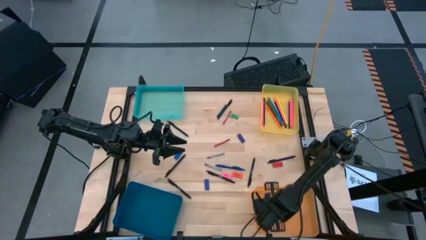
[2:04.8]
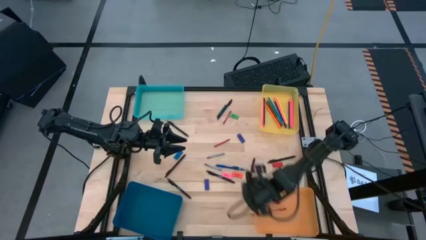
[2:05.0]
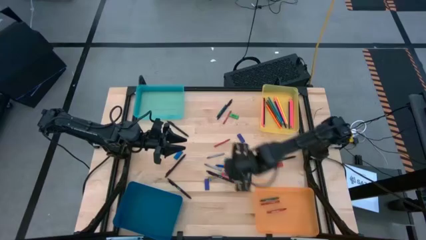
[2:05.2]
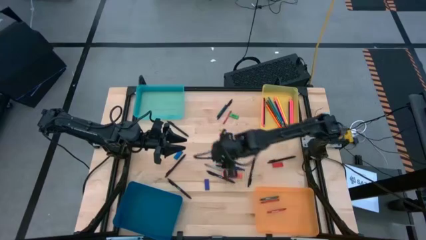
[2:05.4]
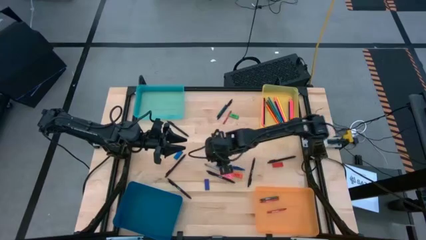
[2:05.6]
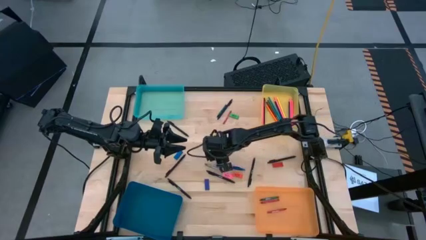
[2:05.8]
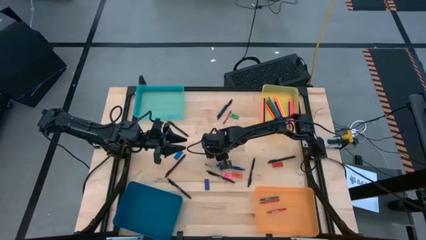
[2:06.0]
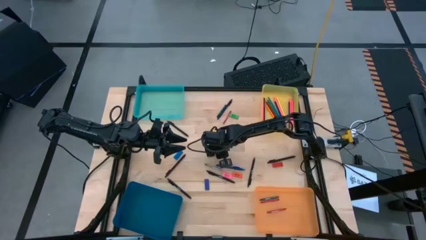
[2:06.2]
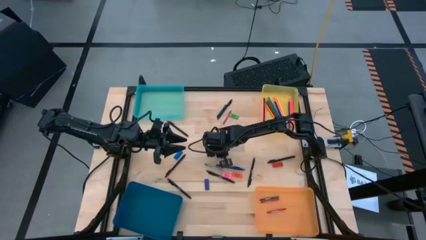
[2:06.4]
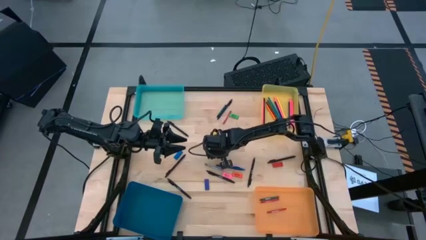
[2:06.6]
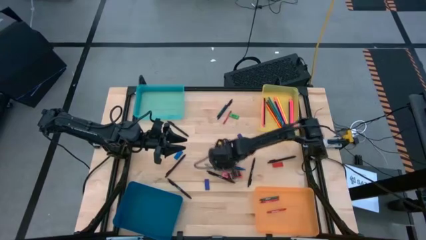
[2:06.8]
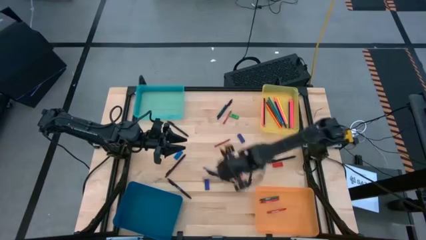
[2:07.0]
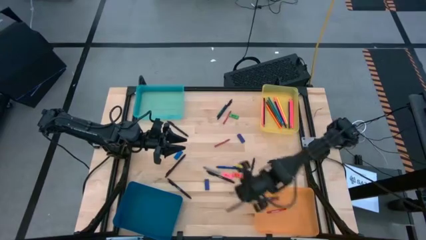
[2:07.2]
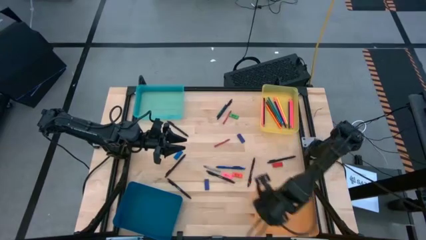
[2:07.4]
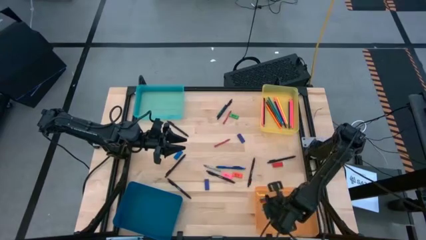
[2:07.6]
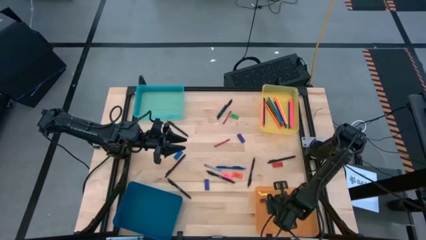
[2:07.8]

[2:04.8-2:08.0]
Task: Sort crayons/erasers/pens/pencils in bins
Put the gray crayon into the orange bin

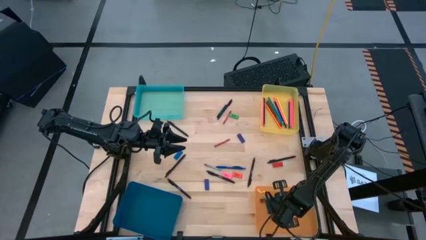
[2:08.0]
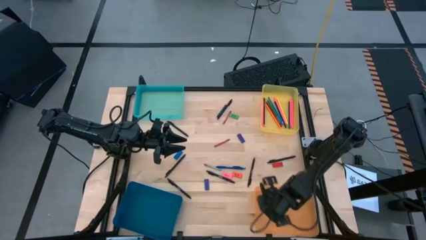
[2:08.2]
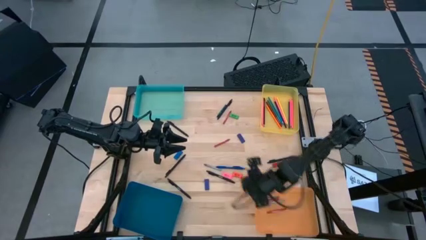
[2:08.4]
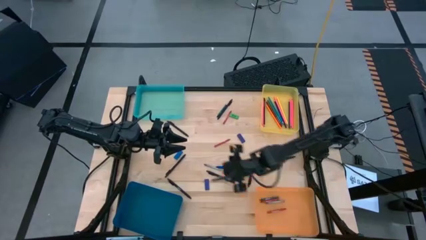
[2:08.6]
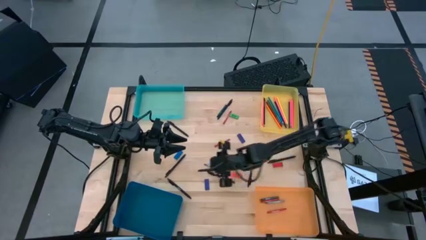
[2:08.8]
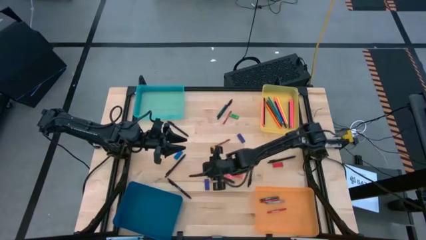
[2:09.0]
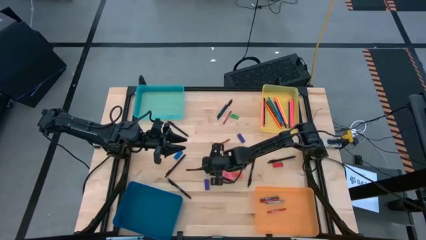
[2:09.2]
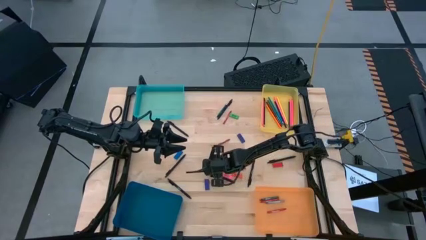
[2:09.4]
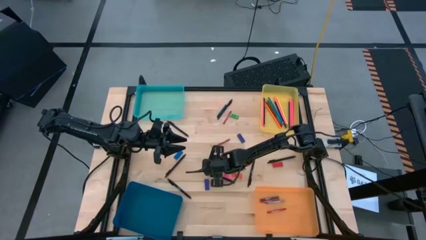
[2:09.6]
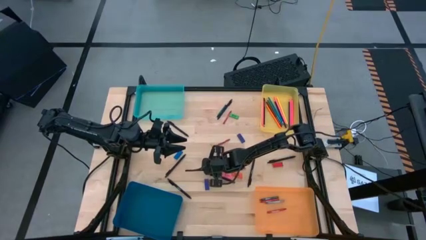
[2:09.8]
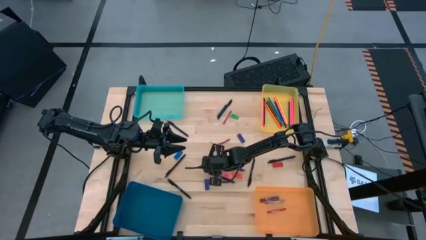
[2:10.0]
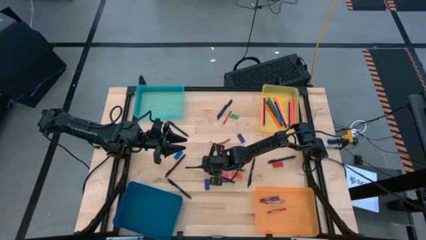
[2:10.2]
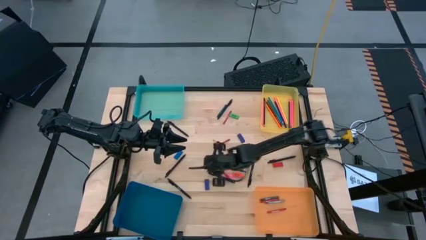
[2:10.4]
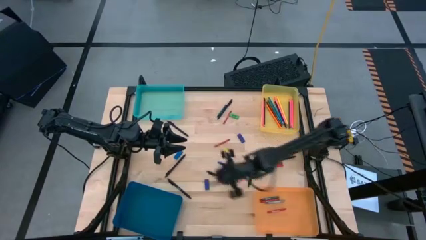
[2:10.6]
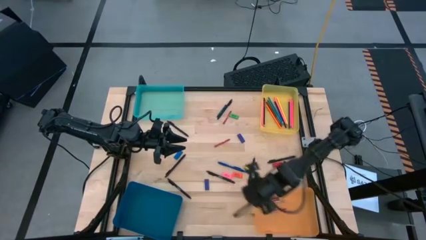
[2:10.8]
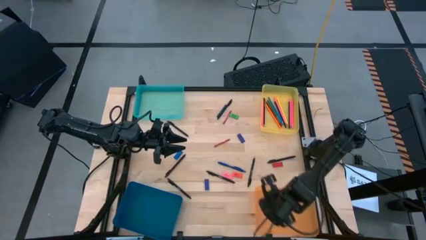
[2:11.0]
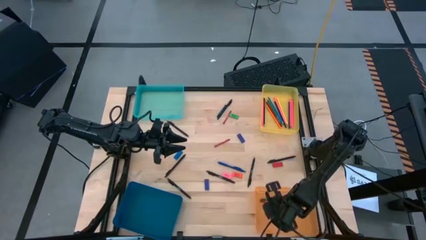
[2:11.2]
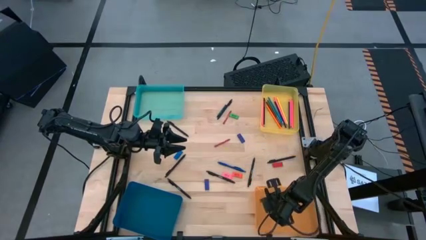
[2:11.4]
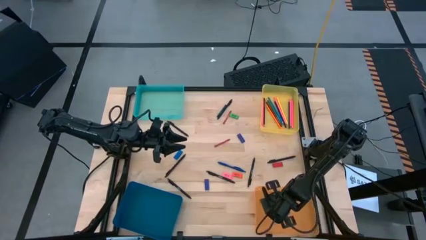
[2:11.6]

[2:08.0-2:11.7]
Put the gray crayon into the orange bin

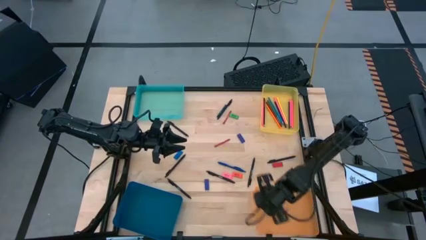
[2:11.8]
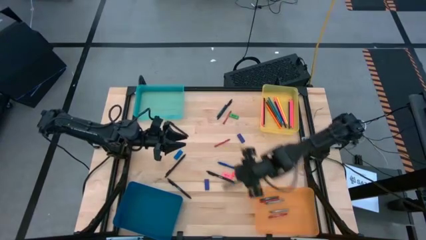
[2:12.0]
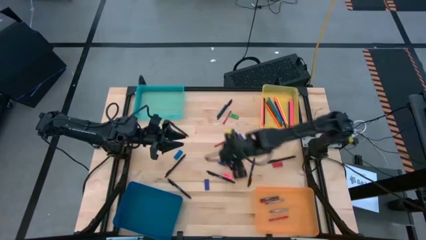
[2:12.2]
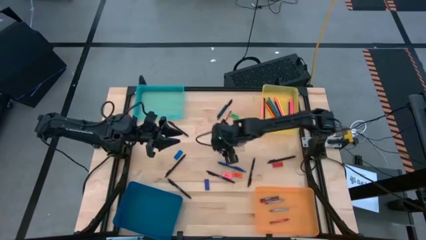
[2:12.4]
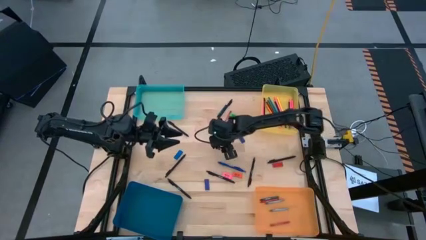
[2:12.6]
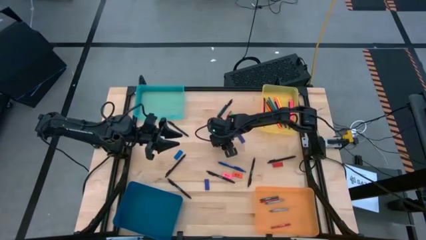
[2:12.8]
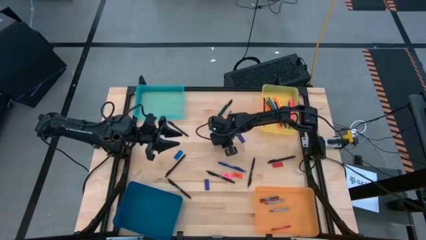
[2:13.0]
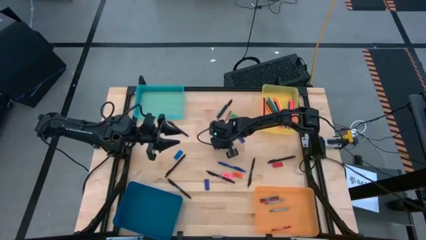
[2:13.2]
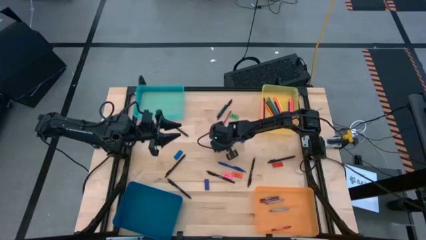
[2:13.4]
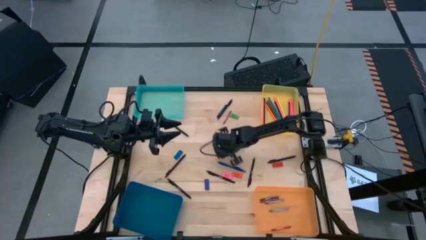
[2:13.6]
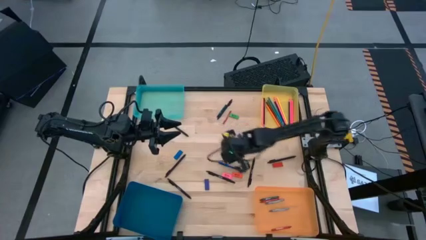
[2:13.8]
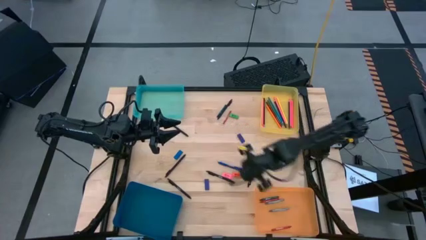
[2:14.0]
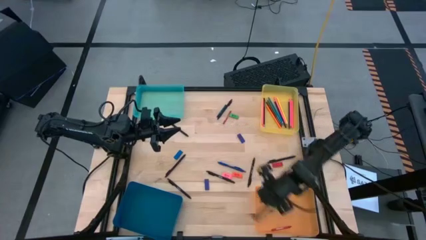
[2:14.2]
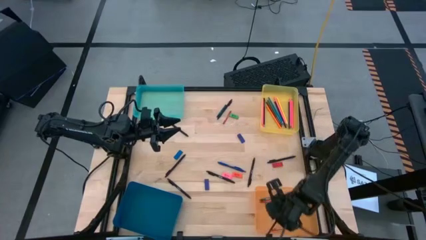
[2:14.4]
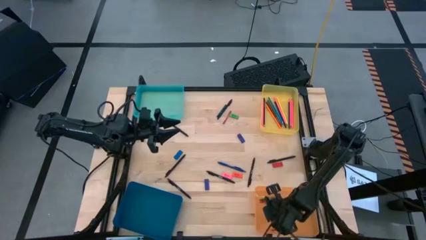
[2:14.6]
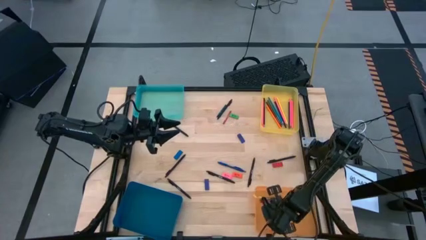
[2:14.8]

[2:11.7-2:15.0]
Put the red crayon into the orange bin

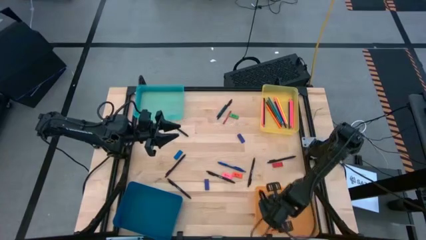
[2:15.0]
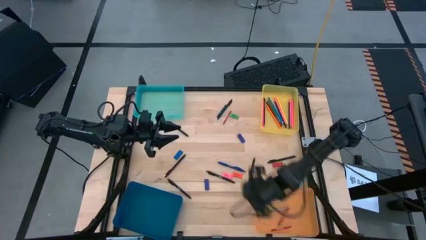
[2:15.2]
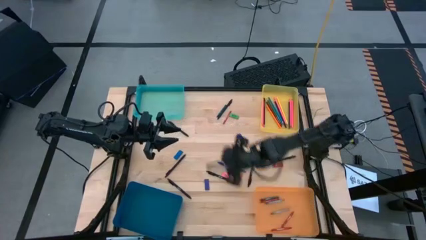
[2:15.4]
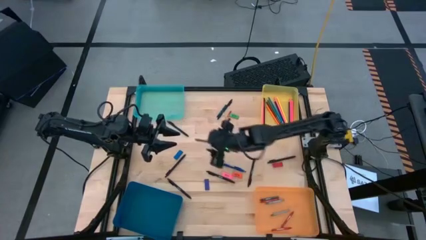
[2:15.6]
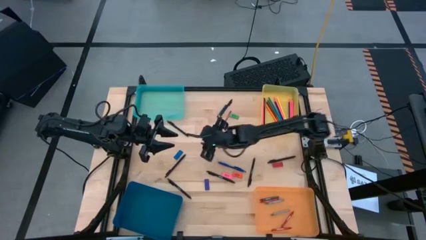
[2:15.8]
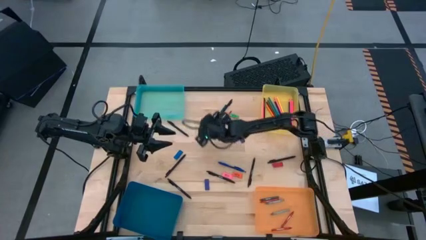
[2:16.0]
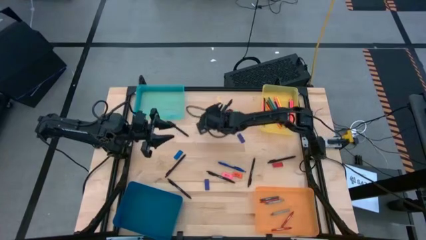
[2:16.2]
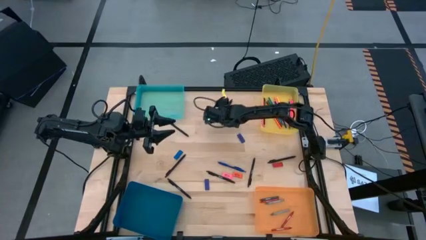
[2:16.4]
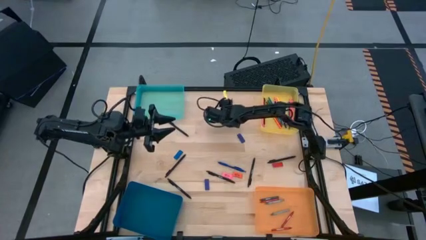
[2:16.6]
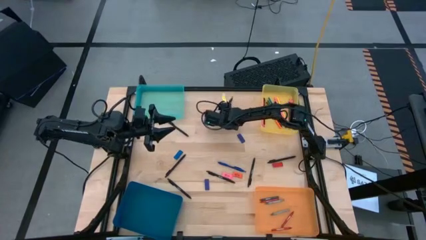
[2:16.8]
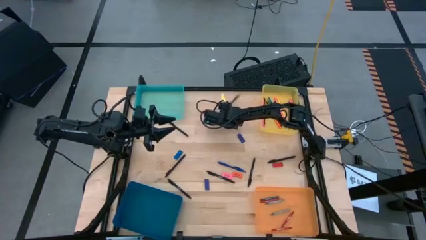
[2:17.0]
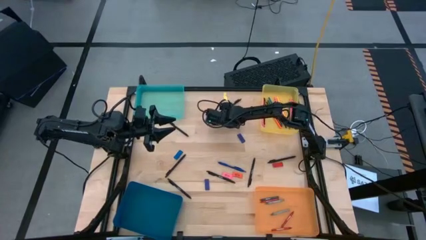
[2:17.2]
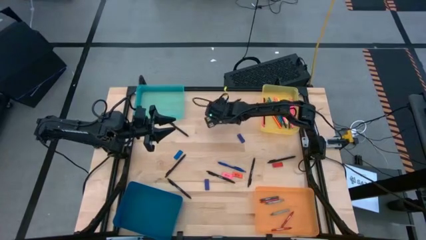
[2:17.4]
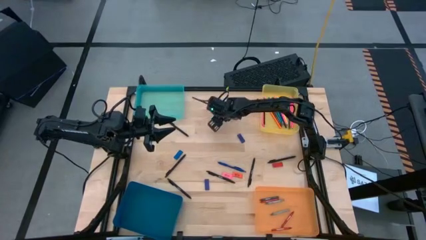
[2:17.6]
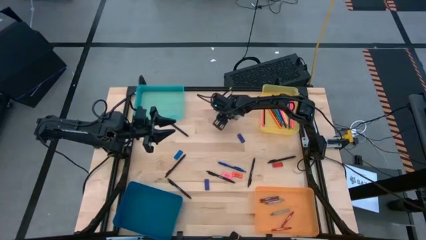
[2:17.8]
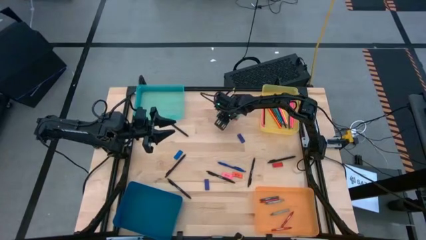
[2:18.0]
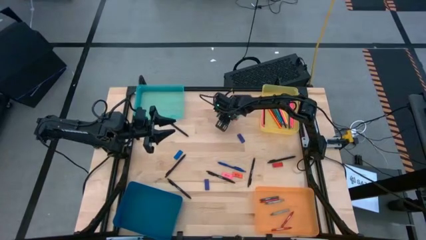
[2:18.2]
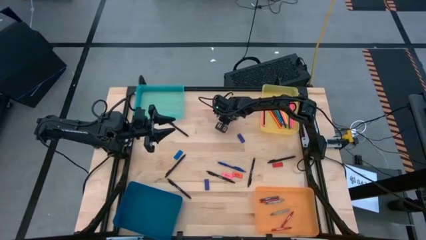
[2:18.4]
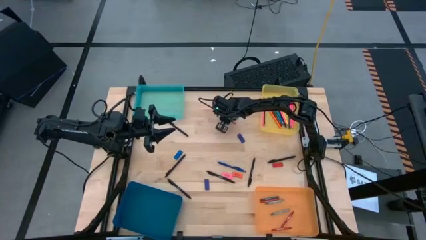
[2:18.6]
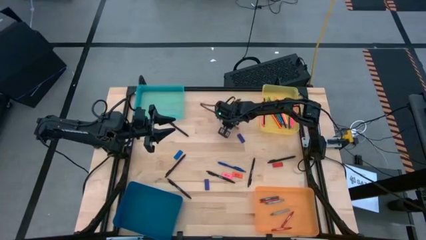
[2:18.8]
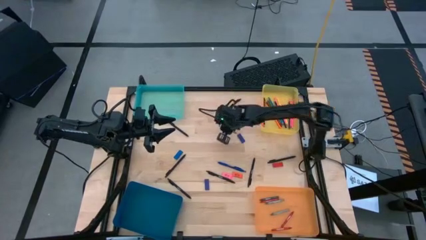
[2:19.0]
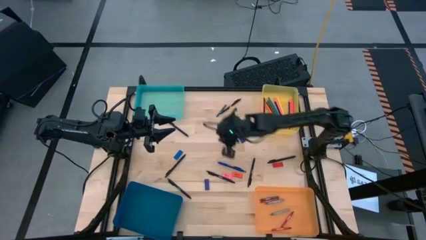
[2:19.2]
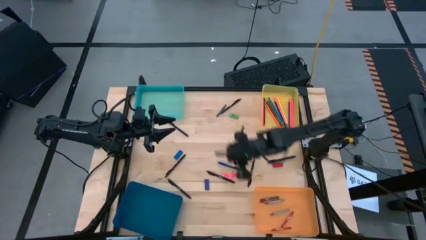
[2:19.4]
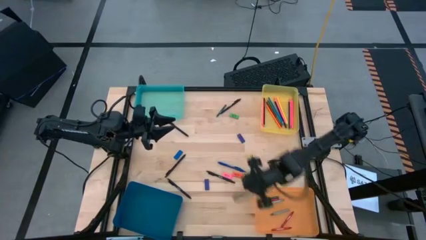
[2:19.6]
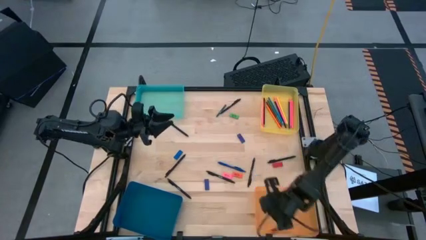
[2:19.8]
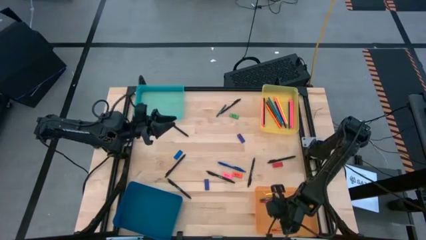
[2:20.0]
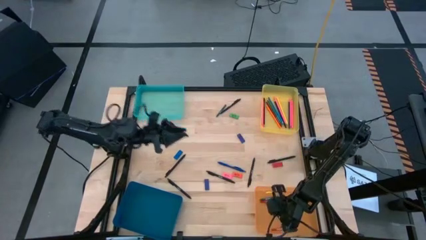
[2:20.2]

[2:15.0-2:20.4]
Put the red crayon into the orange

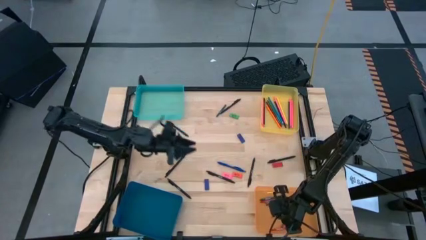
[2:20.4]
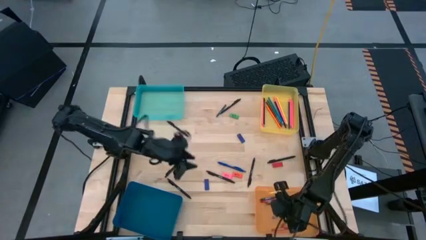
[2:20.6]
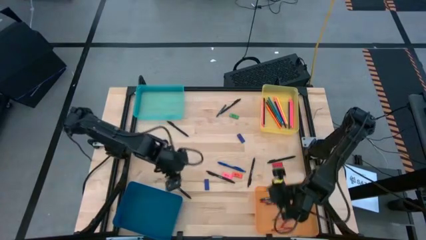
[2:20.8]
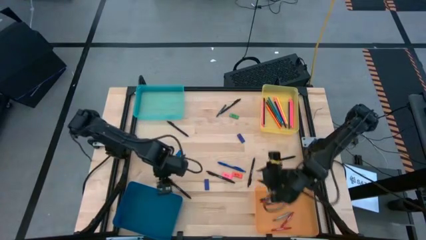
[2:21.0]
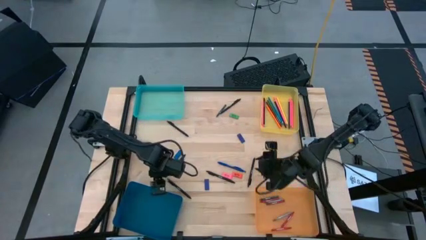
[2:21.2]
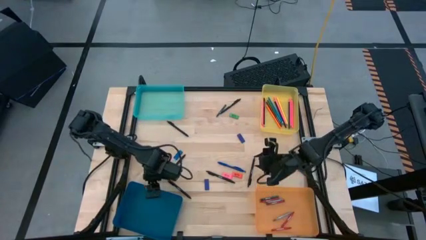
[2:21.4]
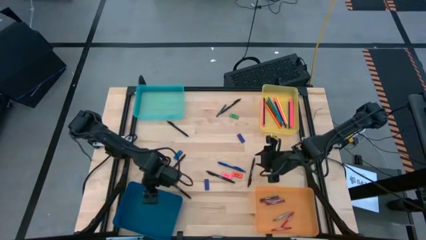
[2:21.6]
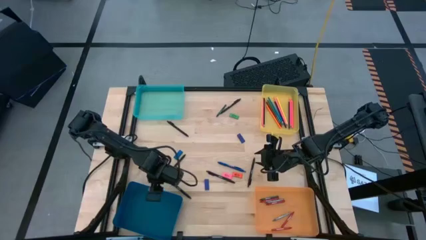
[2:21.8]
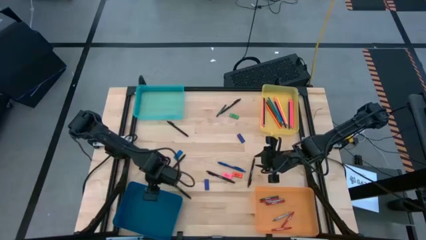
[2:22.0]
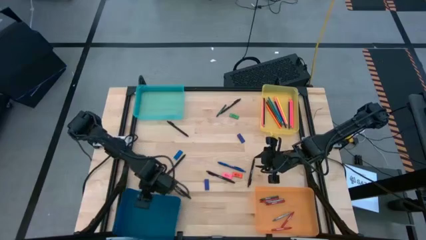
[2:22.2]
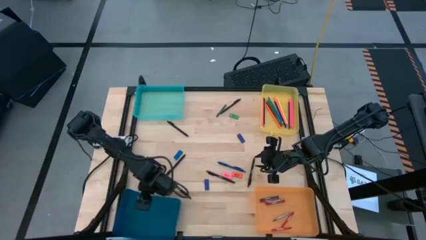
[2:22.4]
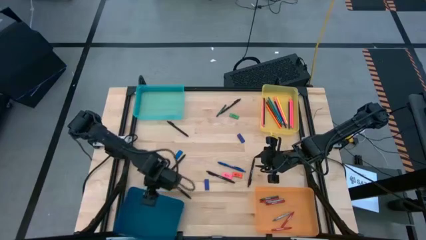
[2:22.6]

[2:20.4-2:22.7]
Adjust the blue bin
